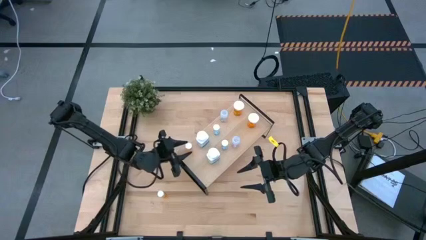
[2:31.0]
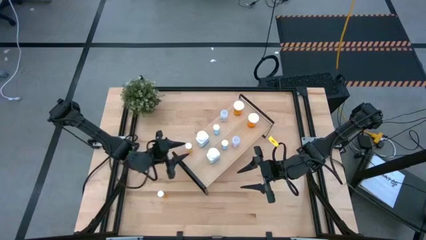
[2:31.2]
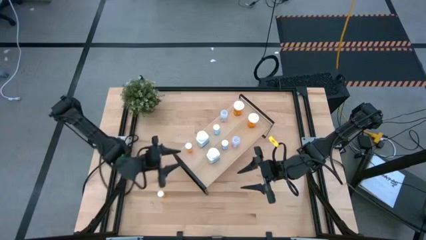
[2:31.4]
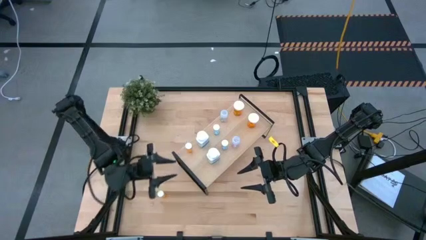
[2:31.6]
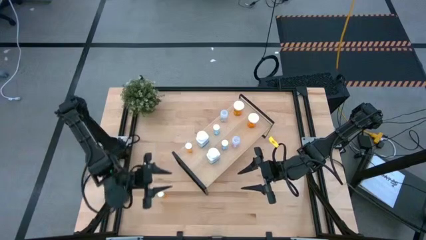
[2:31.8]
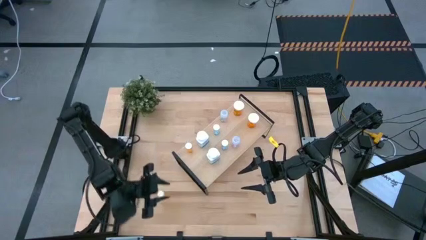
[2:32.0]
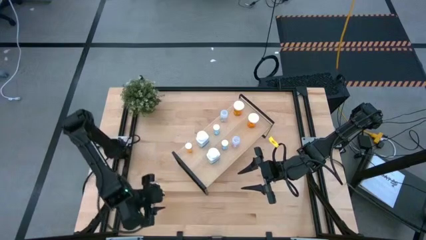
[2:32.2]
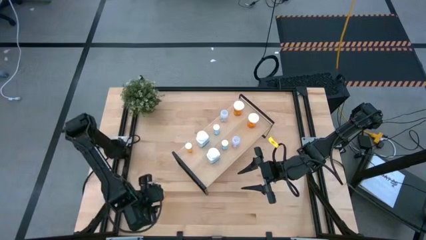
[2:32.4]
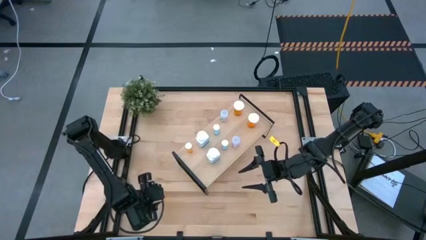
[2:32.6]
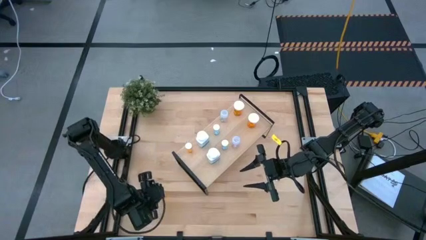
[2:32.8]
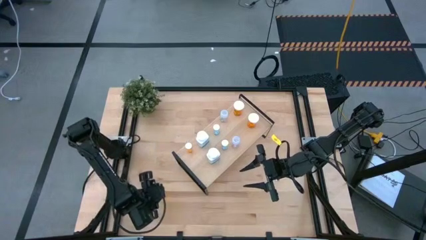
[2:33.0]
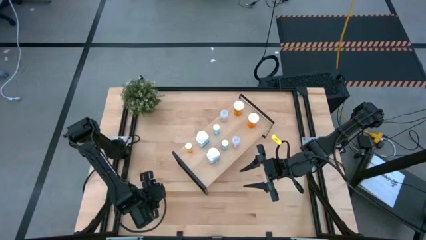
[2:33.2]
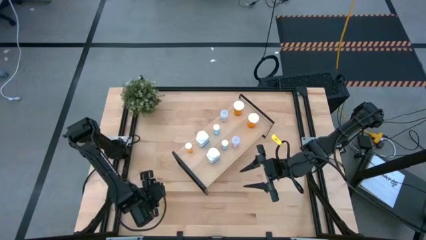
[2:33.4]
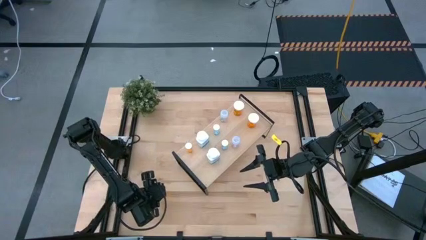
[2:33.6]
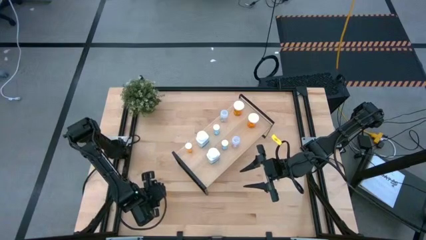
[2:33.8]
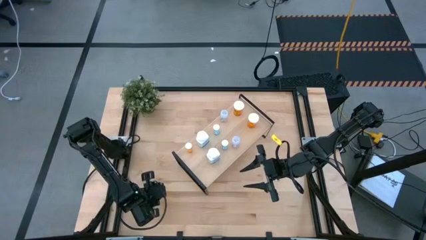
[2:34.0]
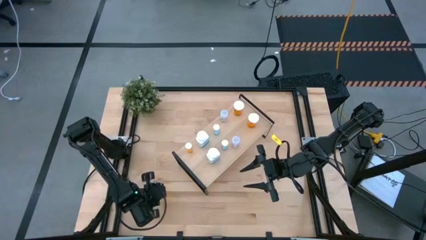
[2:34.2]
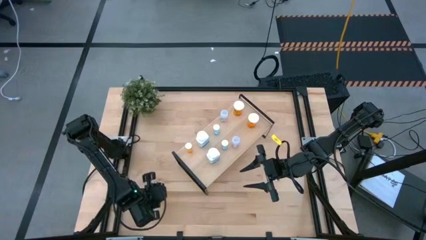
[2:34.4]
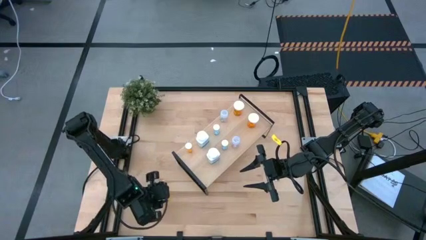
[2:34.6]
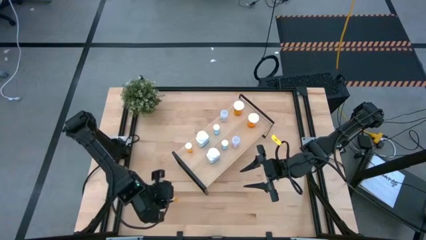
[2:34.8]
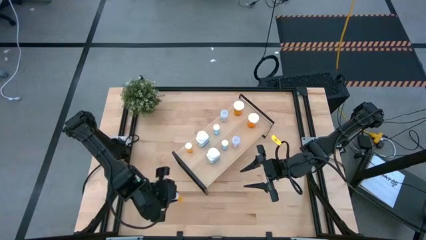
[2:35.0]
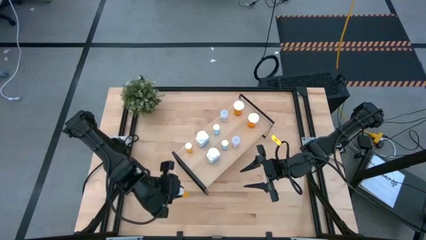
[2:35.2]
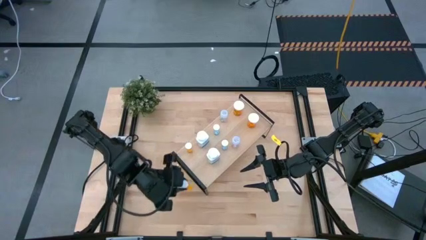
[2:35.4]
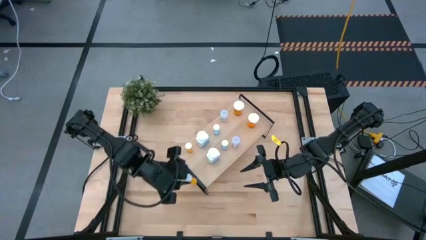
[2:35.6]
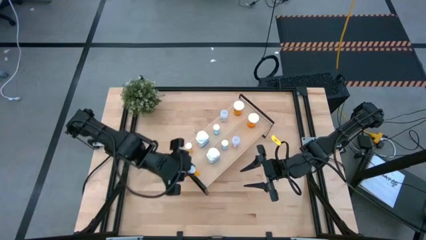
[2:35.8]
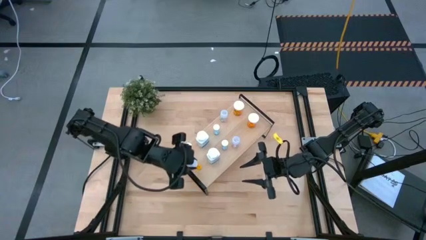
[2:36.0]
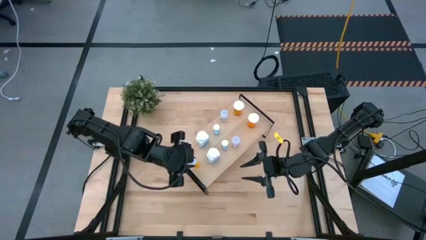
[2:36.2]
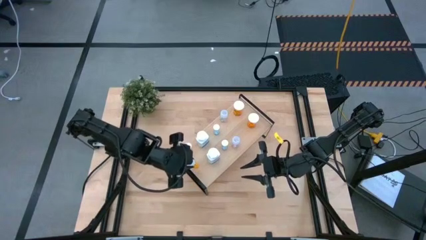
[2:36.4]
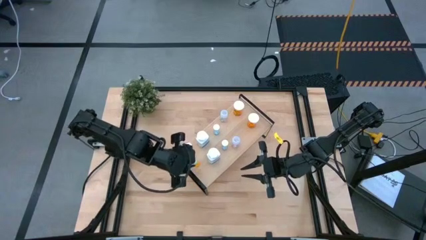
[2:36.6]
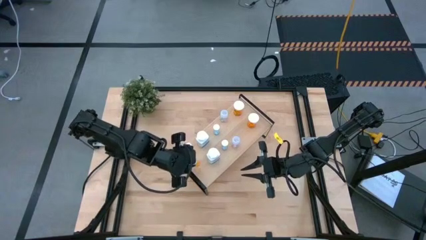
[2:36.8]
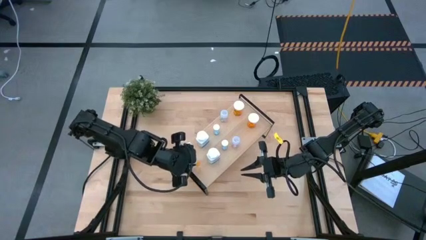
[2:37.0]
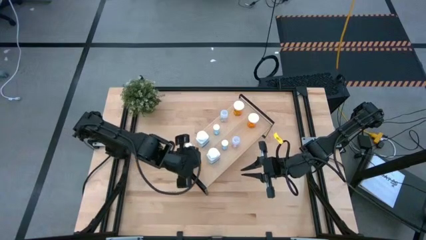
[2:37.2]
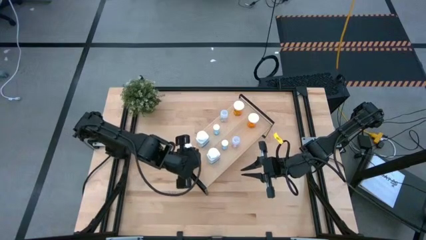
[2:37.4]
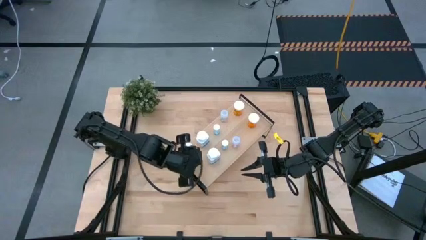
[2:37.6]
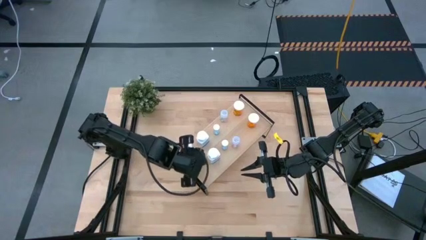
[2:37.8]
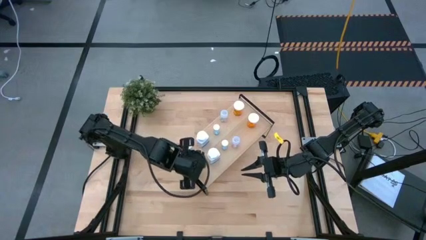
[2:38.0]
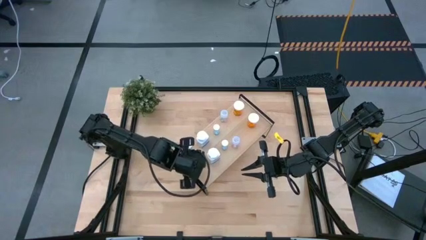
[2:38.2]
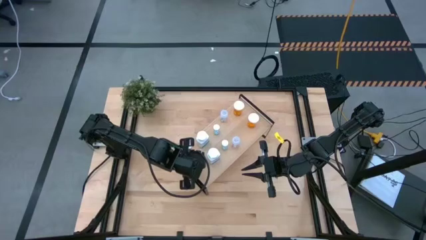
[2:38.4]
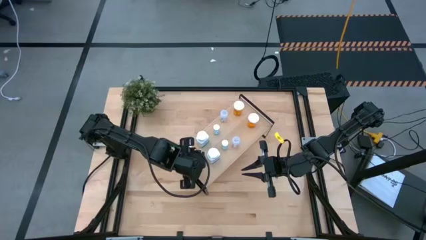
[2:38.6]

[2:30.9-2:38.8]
Task: Pick and place medicine bottles onto shelf by color
Put the small orange pill bottle on the shelf aligned with the other small orange pill bottle

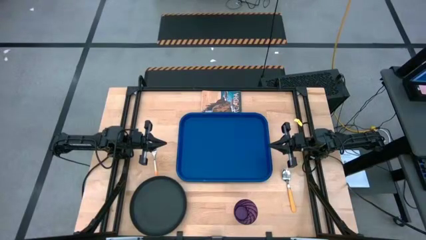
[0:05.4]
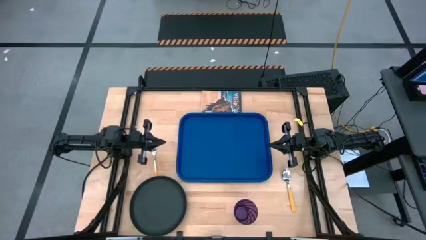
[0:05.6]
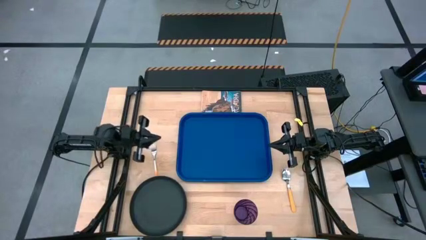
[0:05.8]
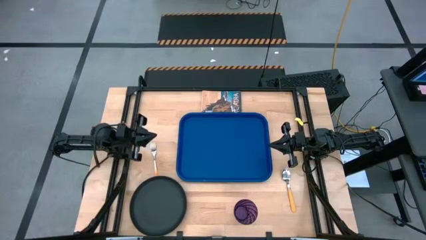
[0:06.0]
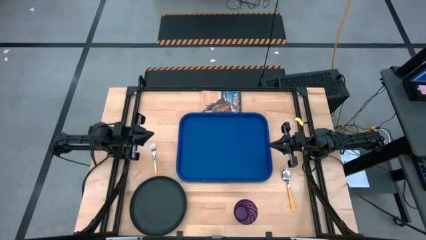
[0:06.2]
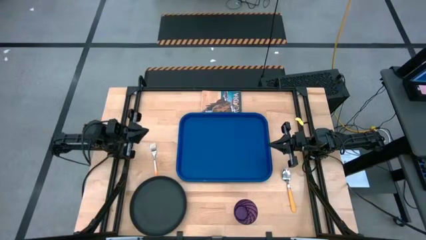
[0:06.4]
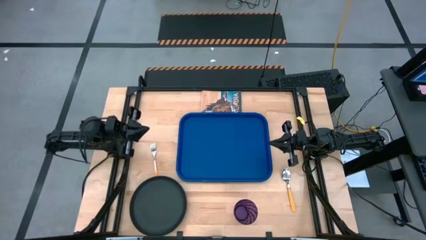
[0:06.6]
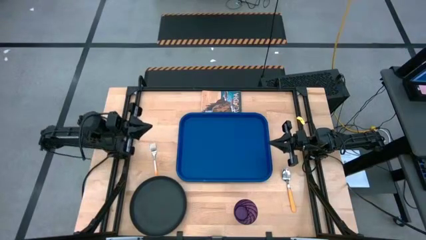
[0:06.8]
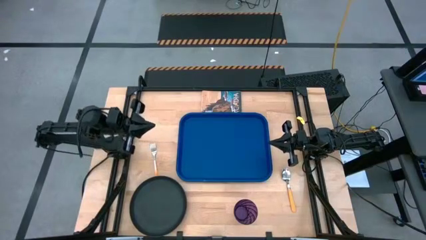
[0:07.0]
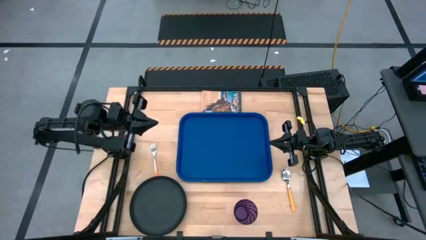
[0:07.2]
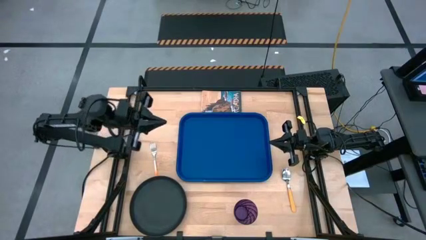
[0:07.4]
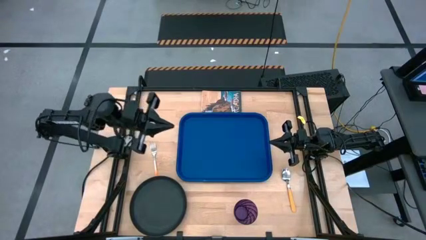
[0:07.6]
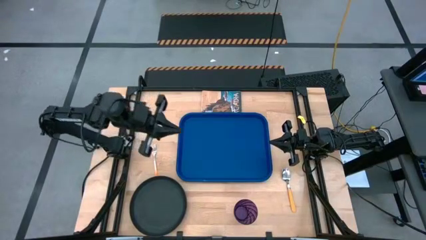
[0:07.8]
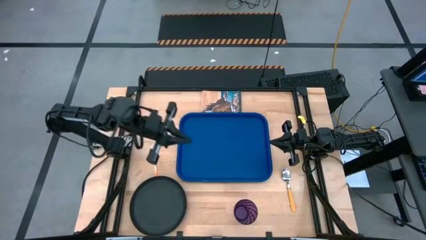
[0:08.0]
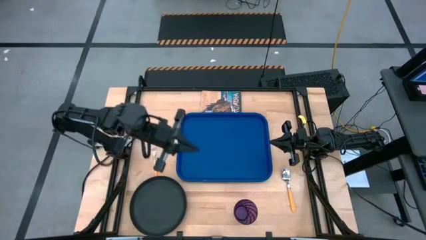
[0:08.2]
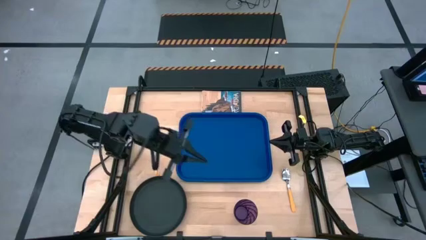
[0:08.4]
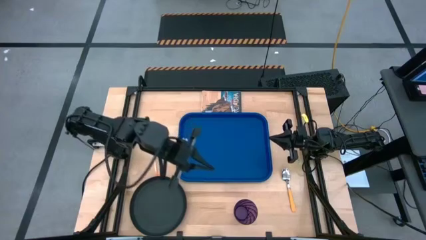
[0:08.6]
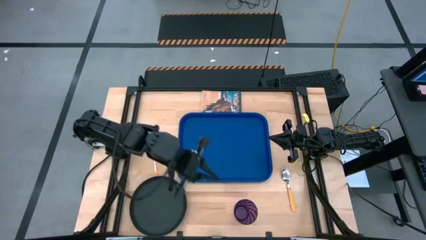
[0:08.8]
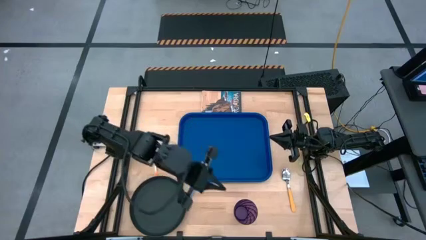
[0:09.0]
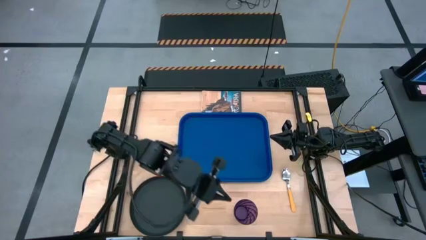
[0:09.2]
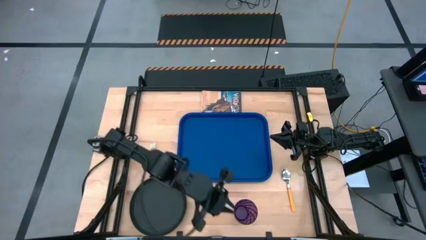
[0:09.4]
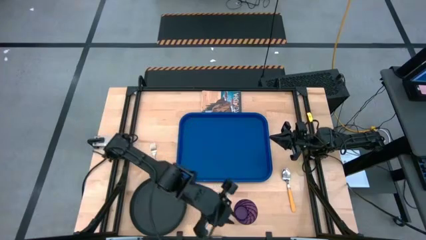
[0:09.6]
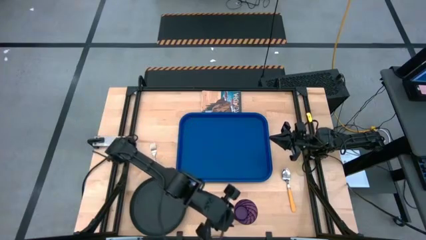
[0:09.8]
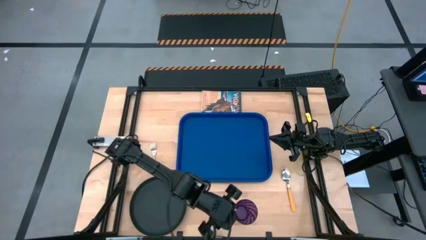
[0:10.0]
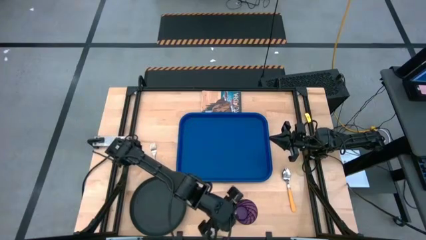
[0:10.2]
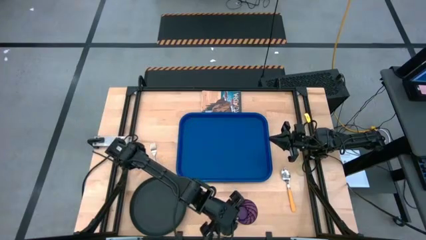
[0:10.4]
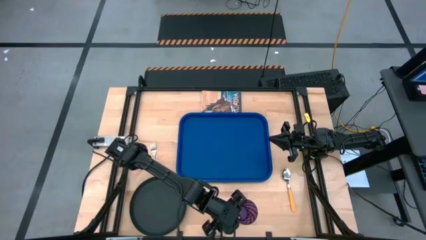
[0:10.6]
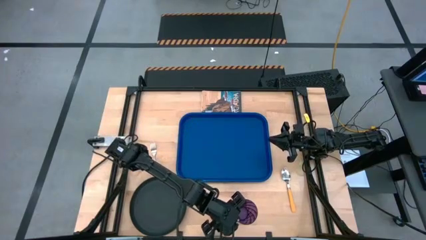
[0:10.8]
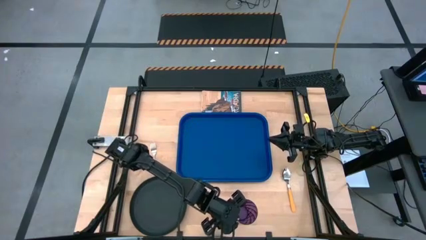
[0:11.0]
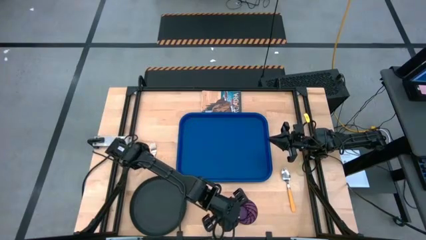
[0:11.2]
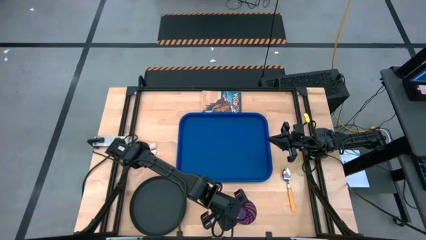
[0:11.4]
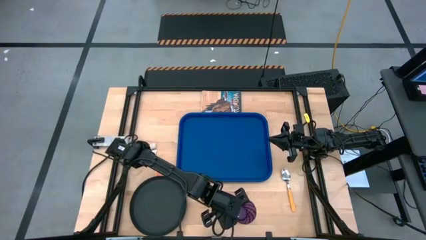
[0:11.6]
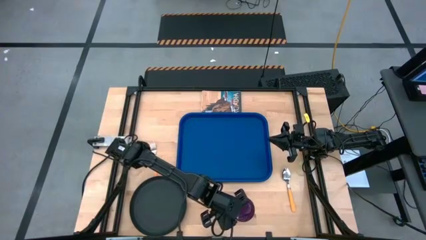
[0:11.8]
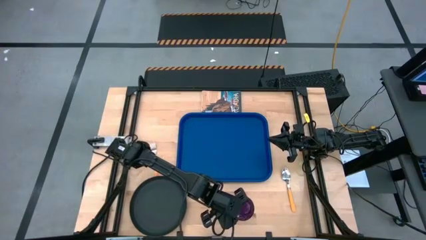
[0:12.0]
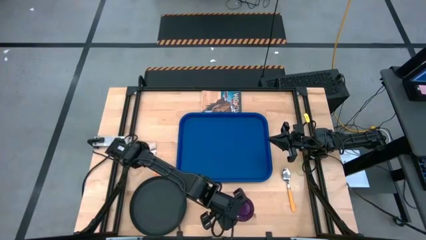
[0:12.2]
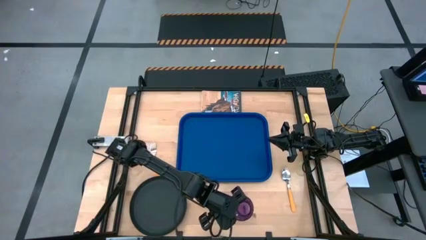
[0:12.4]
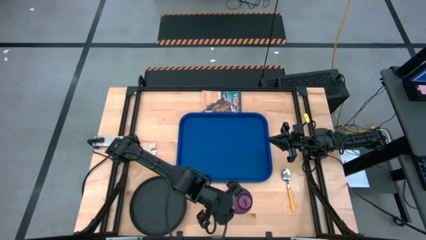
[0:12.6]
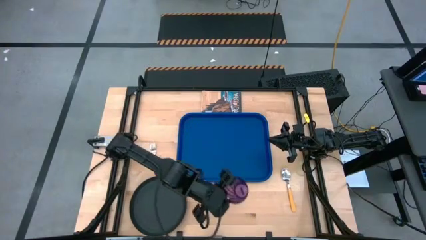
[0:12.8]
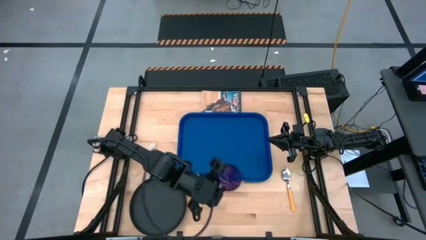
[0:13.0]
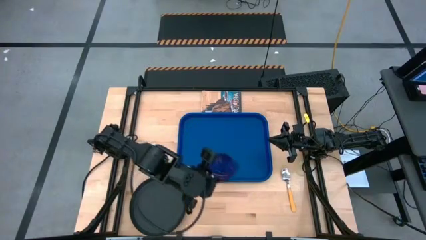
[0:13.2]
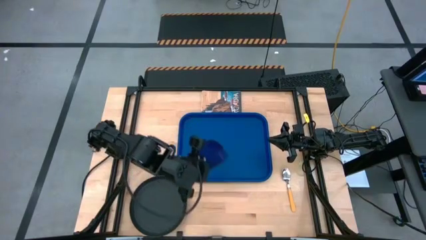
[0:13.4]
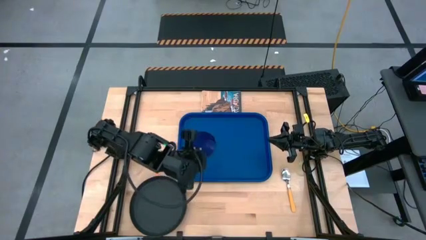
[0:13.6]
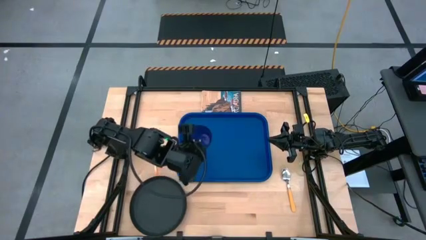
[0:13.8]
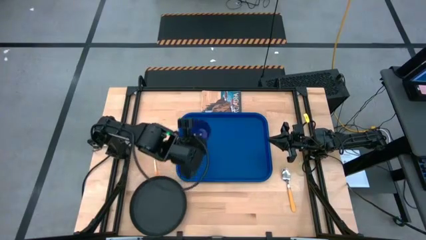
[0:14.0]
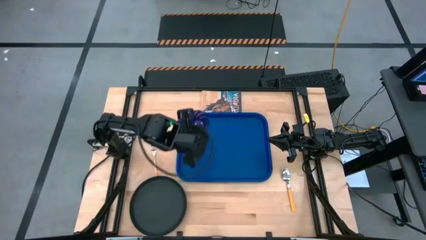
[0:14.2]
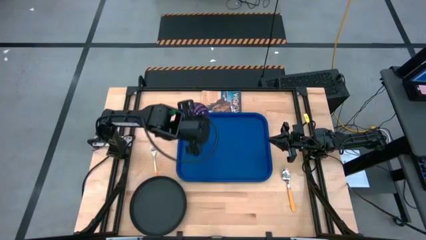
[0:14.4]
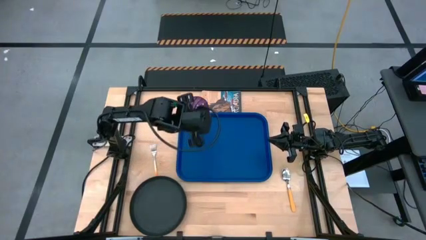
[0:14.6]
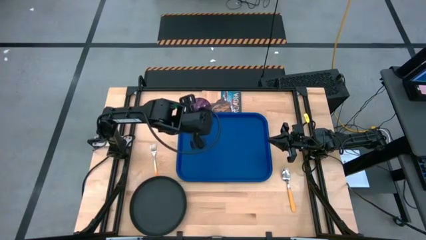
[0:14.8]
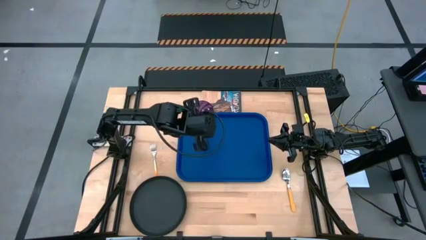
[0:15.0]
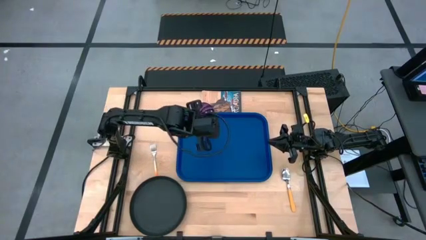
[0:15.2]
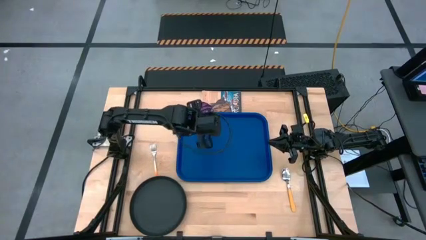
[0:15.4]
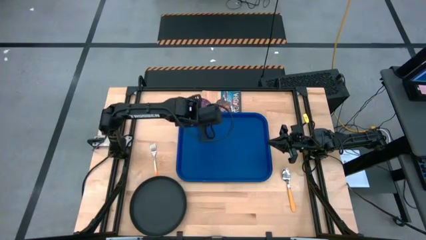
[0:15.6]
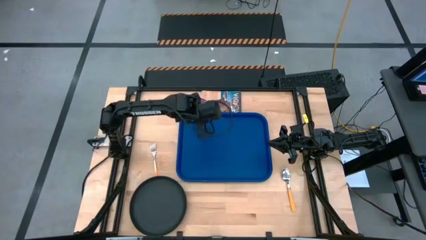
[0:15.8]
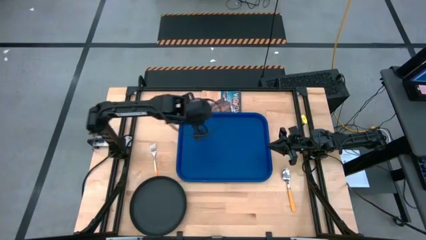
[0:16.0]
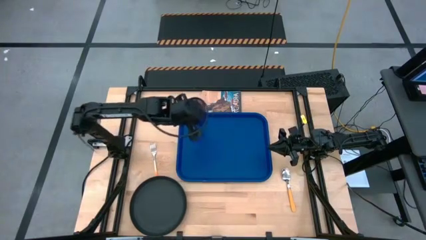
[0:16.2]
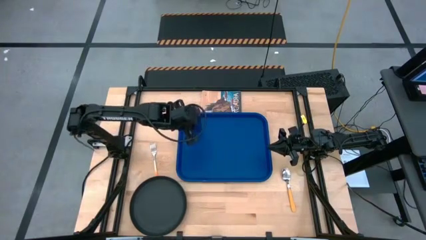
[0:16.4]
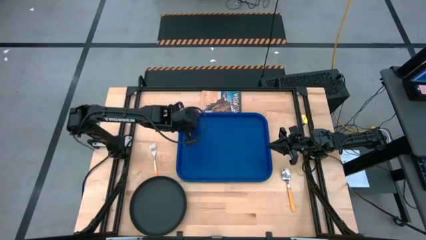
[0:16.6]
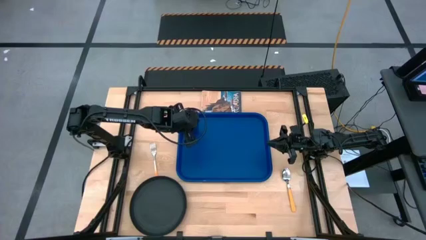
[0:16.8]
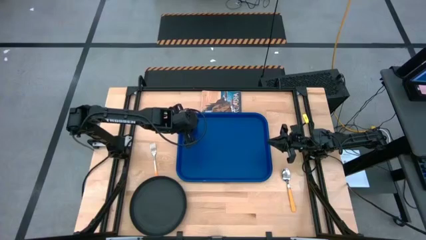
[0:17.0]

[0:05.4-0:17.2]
Task: Pick and place plate/cup/fork/spoon on tray
Put the purple glass on the blue serving tray
